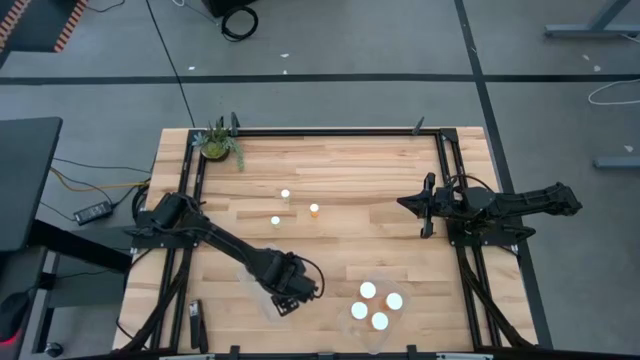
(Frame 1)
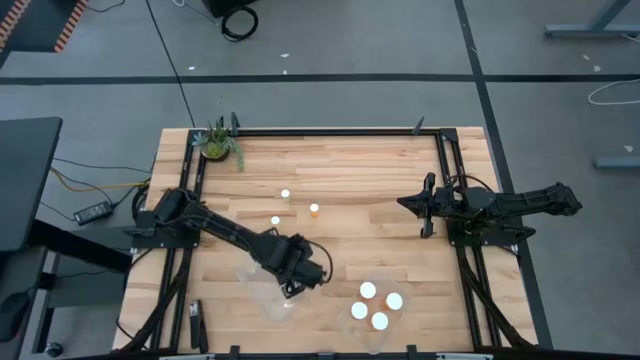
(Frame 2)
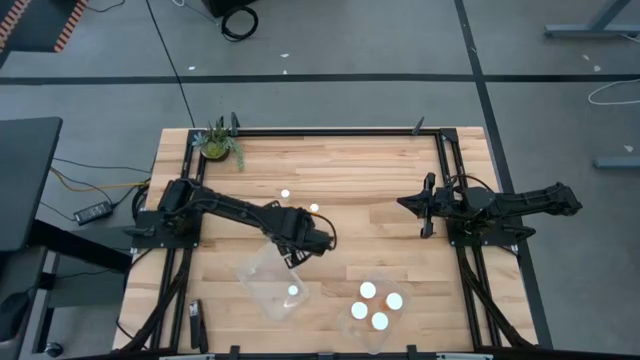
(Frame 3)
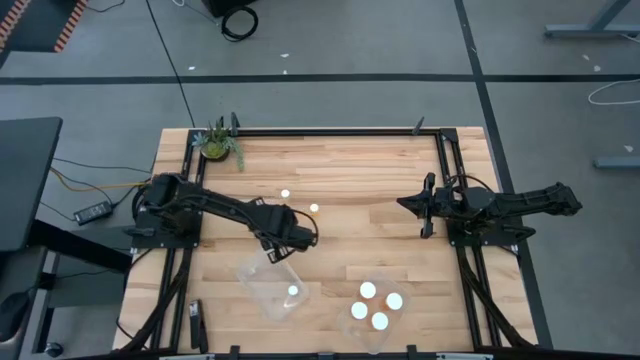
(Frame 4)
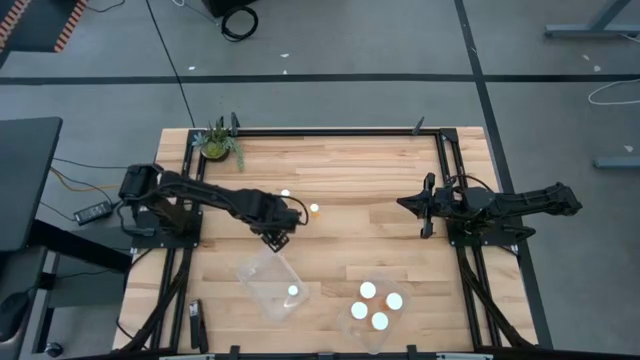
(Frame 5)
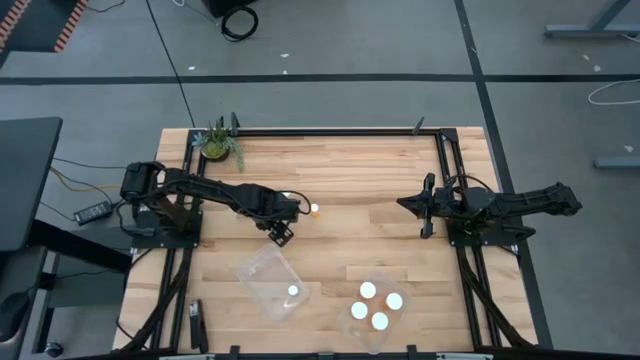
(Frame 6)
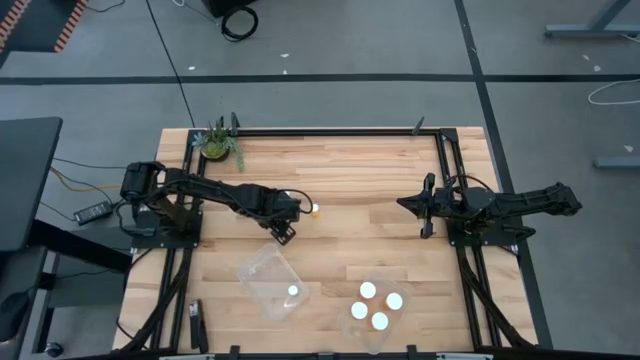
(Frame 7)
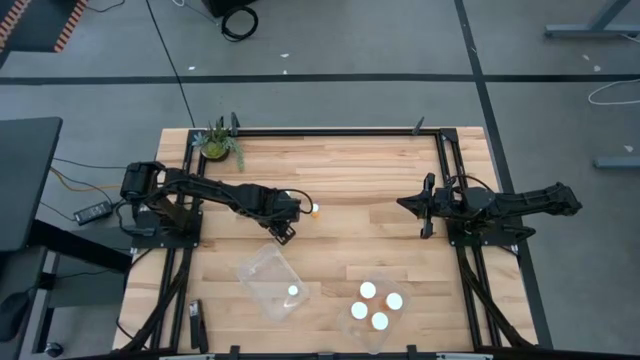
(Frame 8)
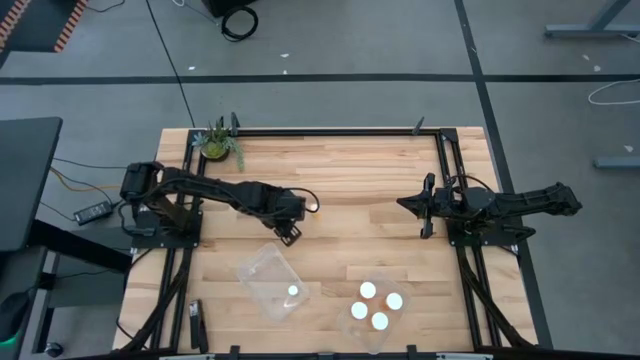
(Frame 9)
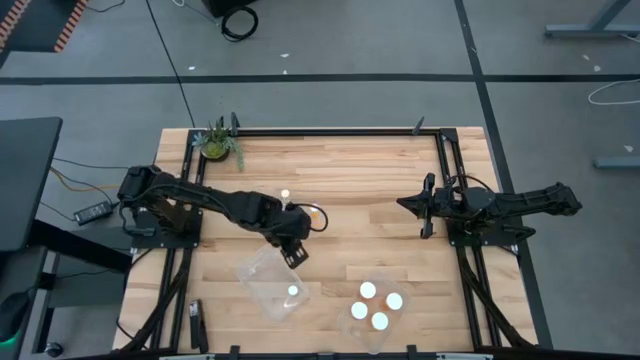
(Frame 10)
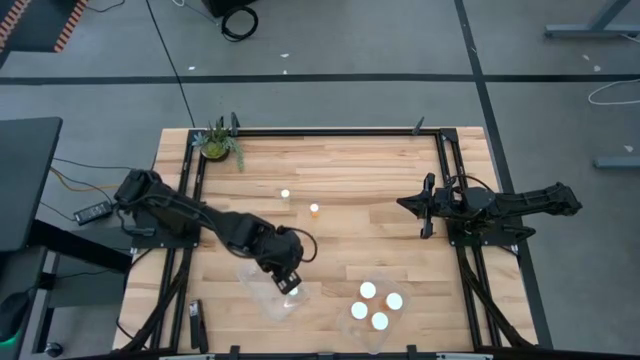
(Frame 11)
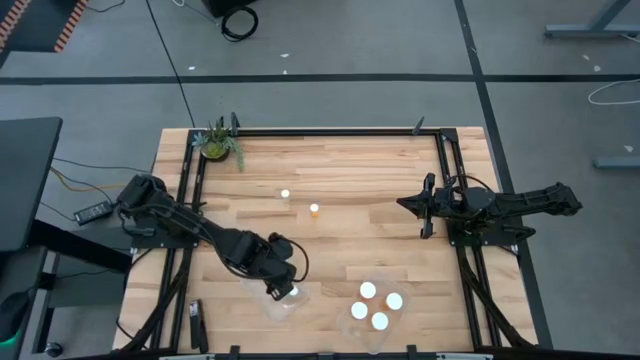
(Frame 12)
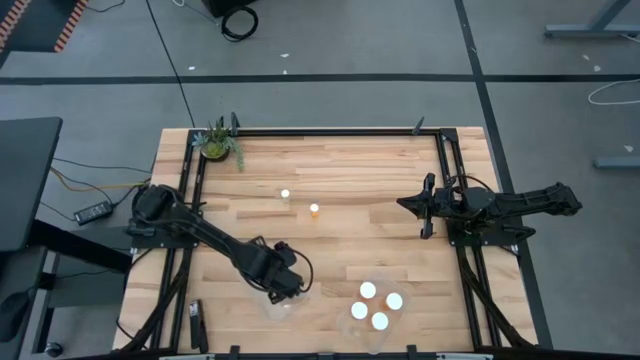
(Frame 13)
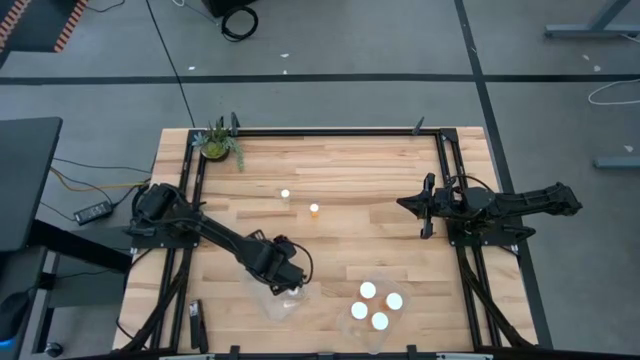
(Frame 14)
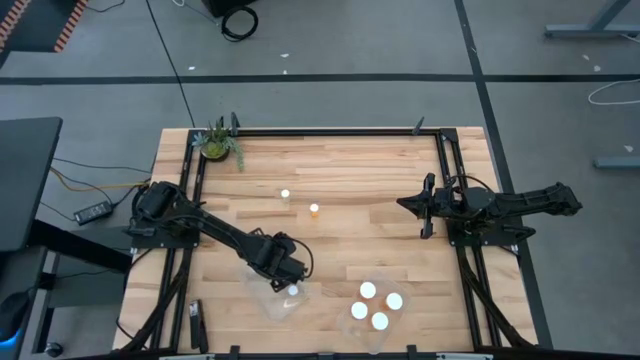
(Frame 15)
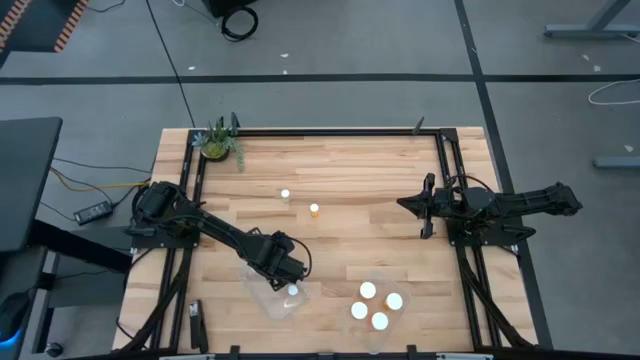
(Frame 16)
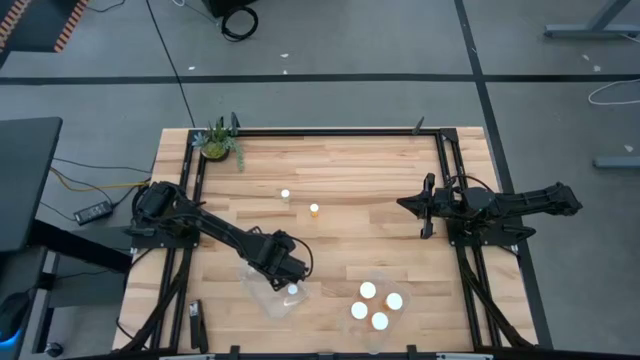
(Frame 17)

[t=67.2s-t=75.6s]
Task: Pick and place medicine bottles into bin by pill shape (circle, oval)
Put the small yellow pill bottle into the left transparent bin

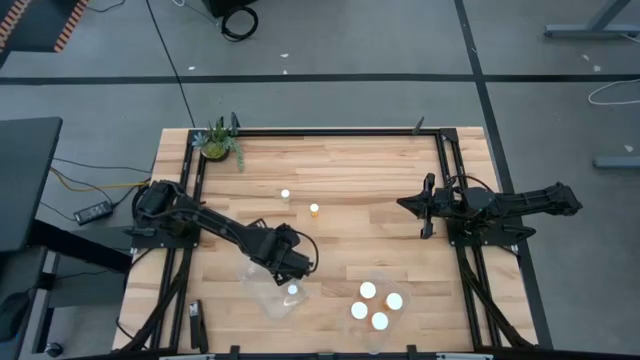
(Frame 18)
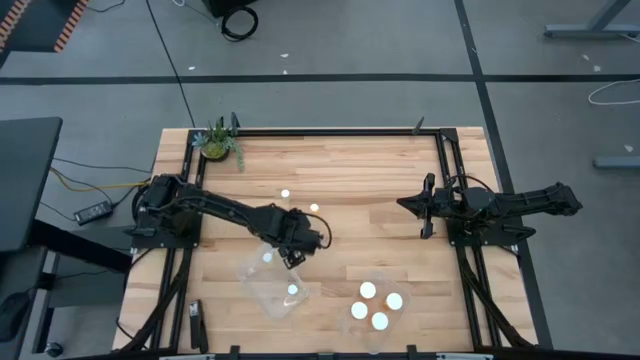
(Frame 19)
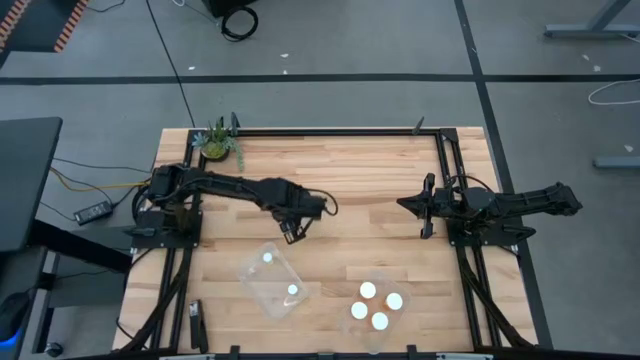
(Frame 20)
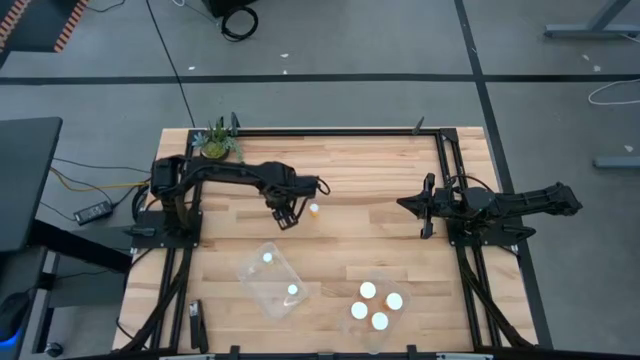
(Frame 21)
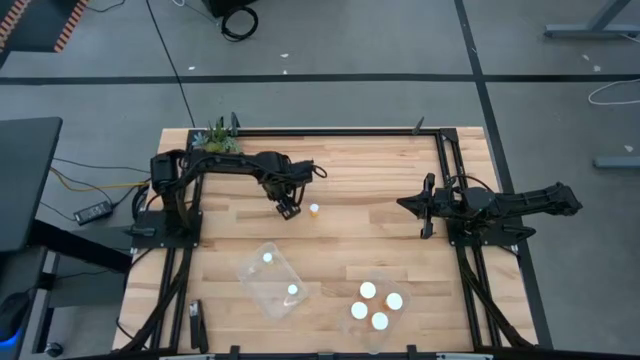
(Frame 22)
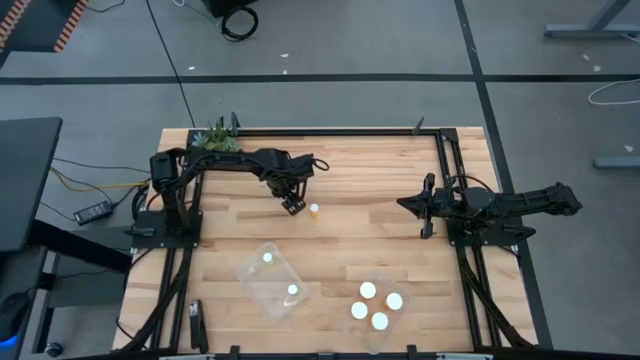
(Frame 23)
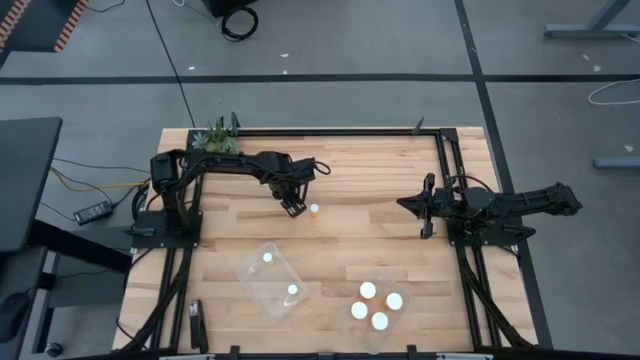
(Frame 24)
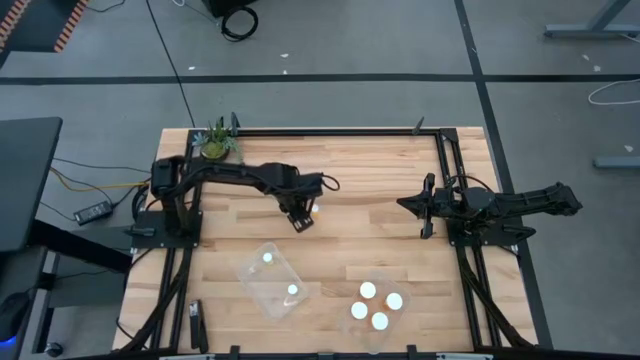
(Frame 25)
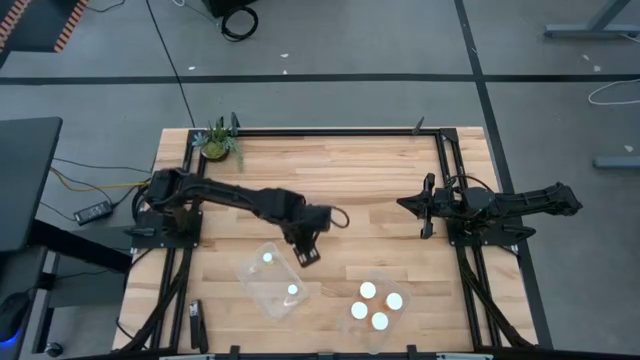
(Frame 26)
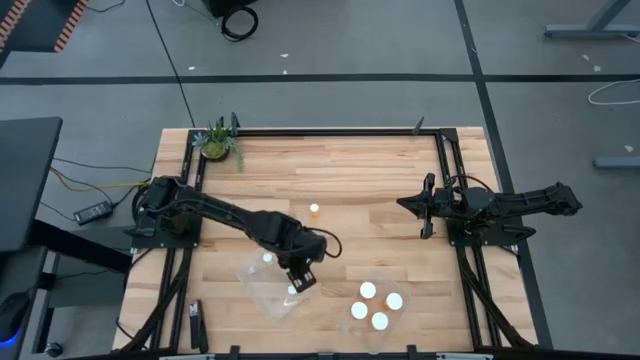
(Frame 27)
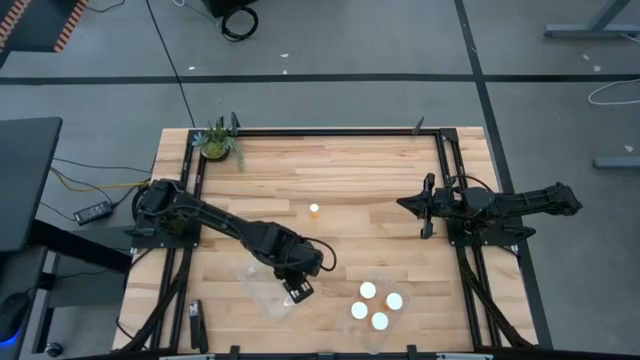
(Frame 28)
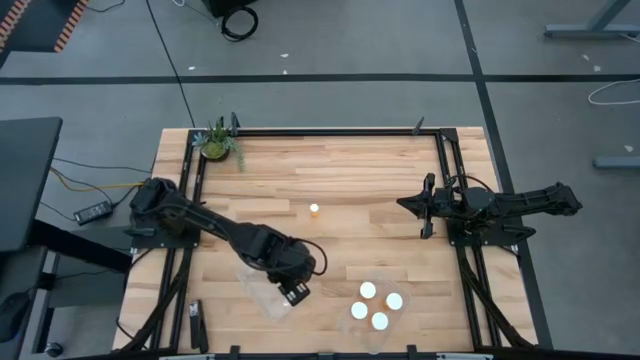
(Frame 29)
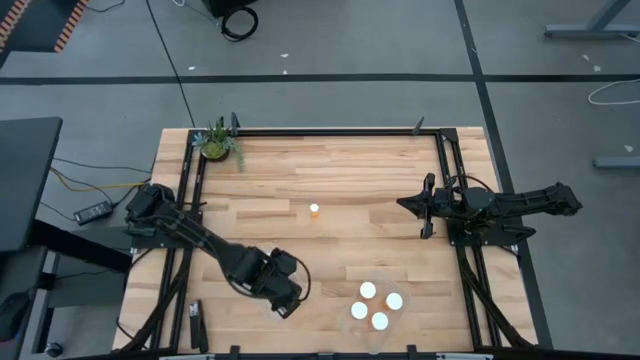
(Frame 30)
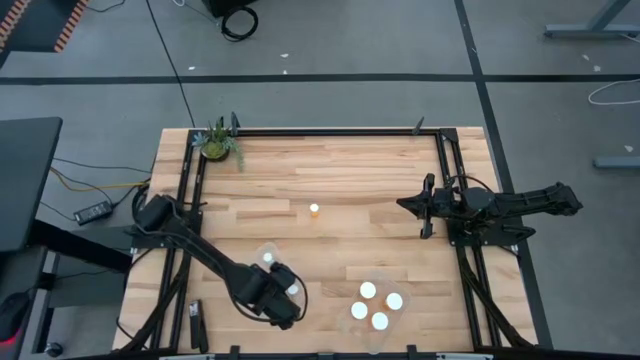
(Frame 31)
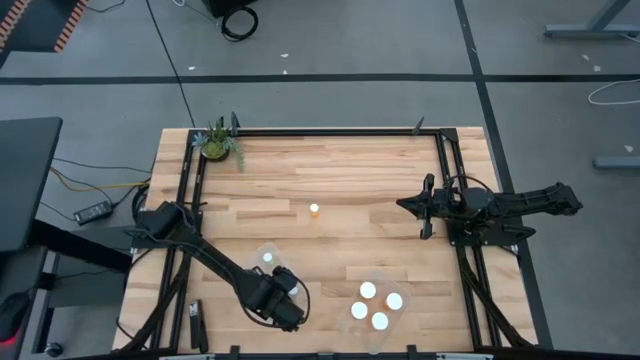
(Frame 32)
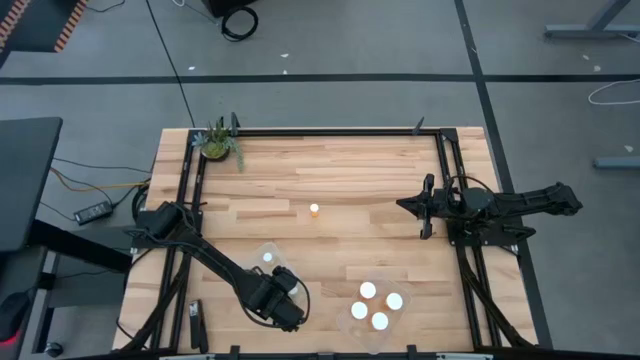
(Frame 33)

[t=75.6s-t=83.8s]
Put the small yellow pill bottle into the left transparent bin

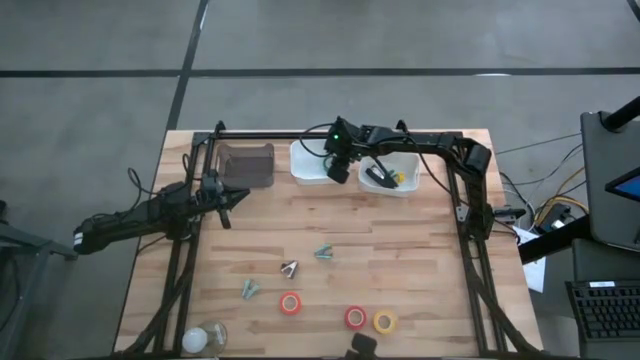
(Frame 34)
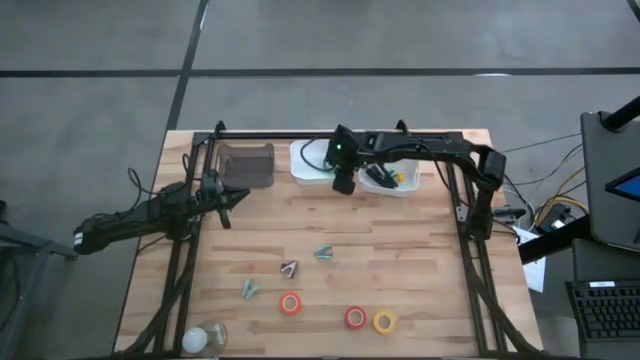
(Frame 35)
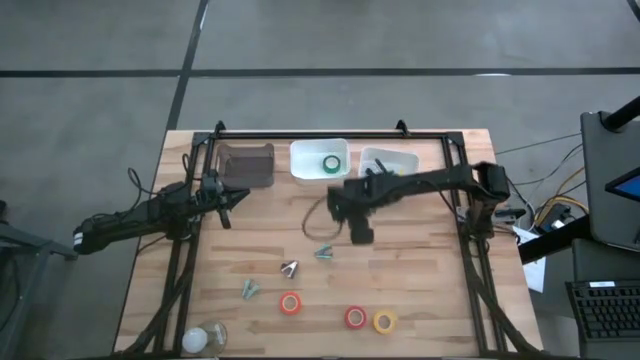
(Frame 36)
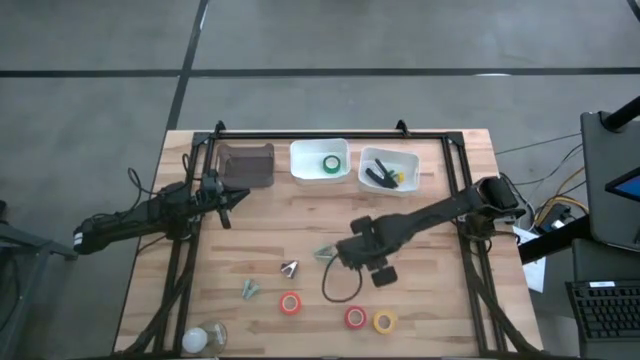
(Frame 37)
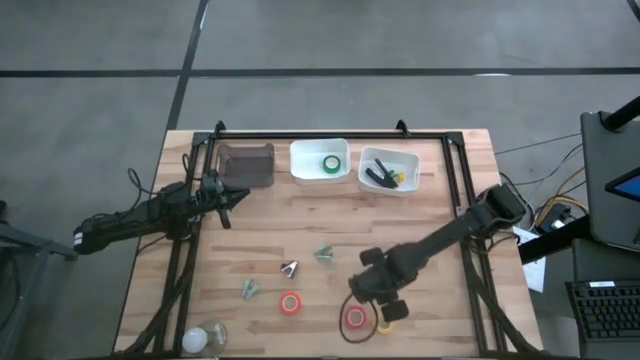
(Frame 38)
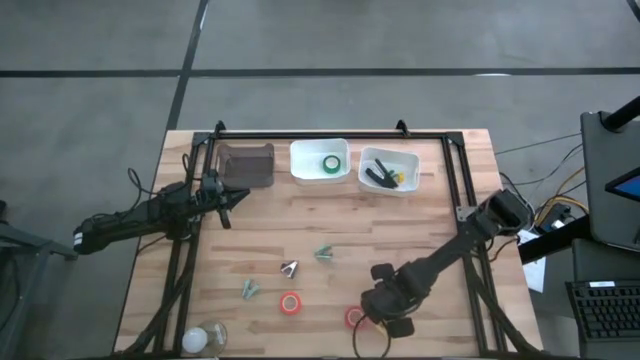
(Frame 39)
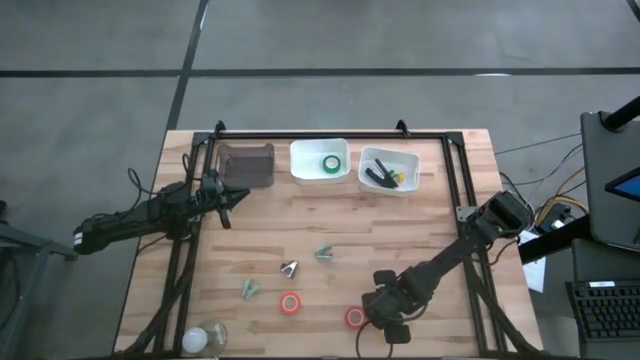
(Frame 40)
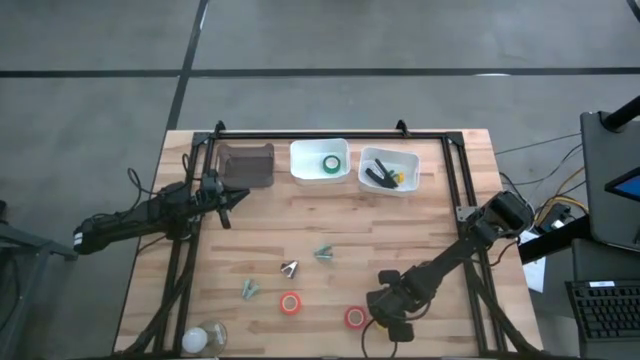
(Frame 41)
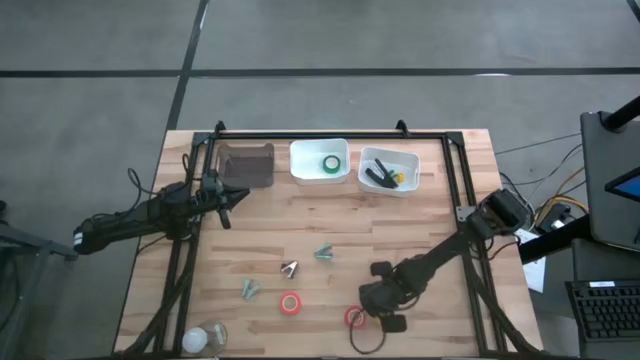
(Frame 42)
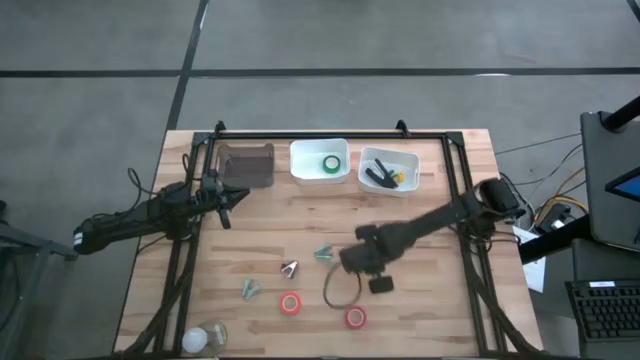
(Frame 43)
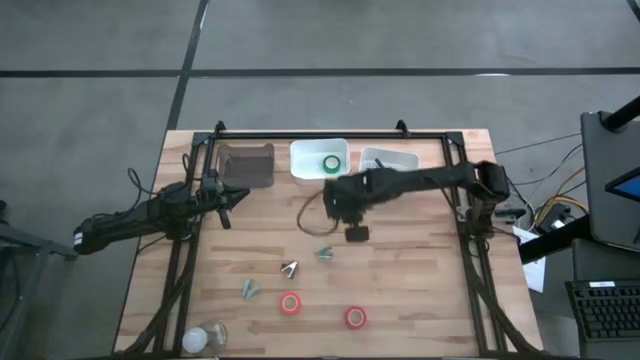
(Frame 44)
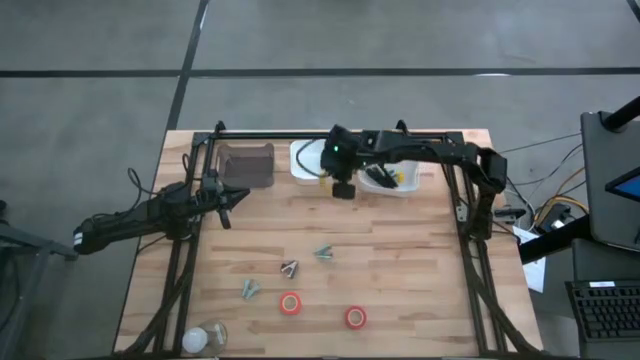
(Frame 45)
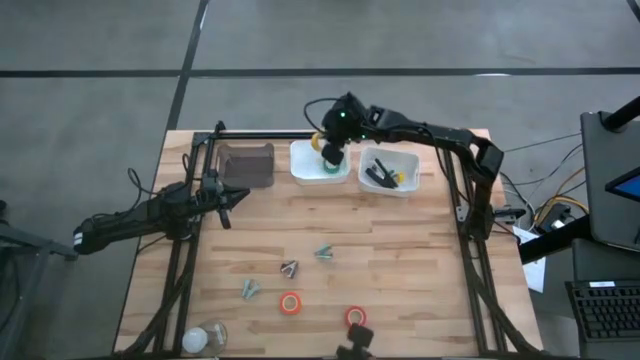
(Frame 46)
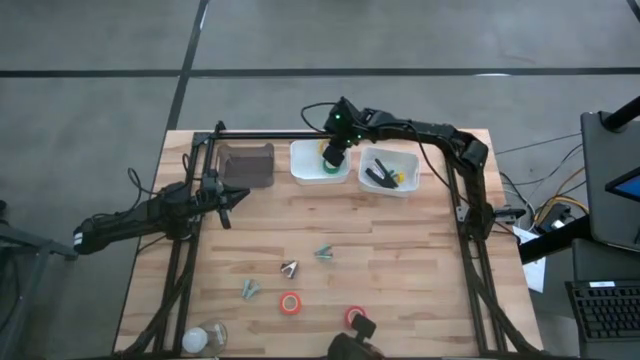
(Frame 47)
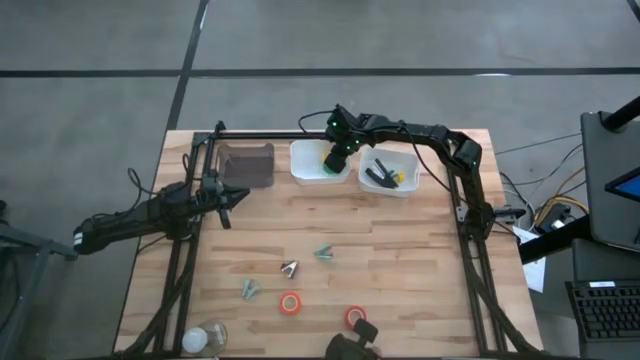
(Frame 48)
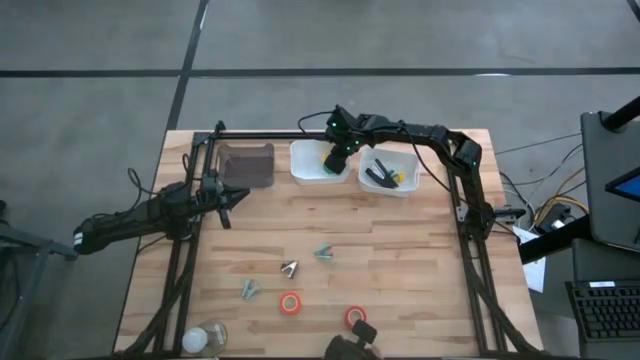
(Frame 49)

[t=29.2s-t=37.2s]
Task: Pick and place Stapler, Stapler remover, tape
Put the yellow tape into the left white bin
